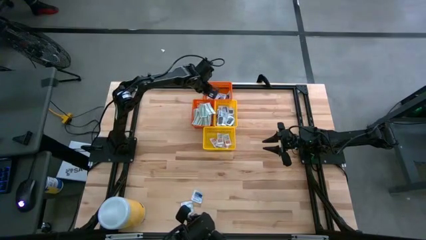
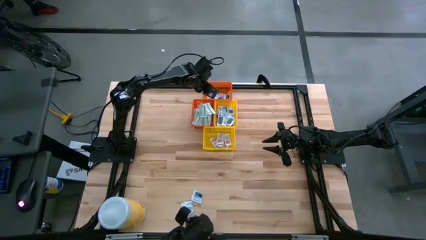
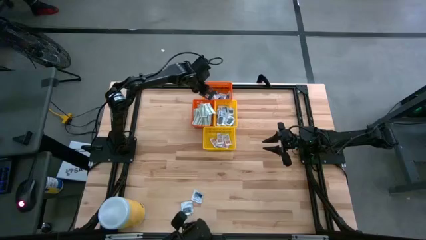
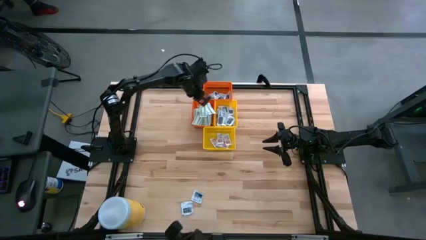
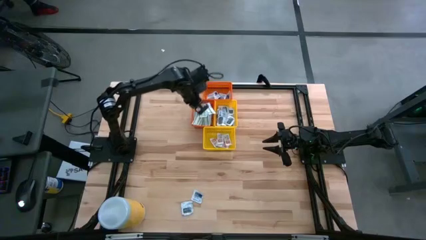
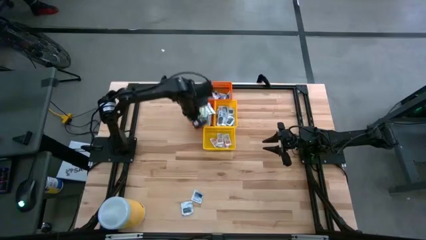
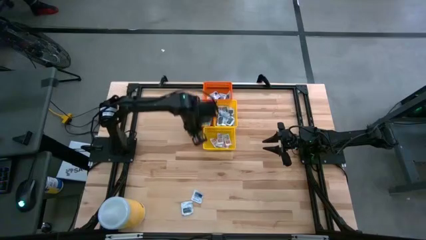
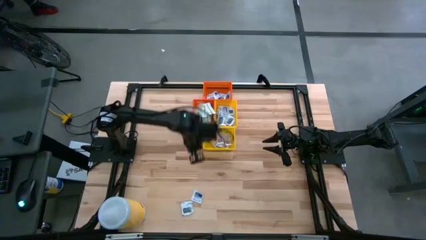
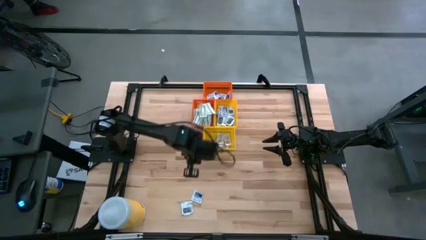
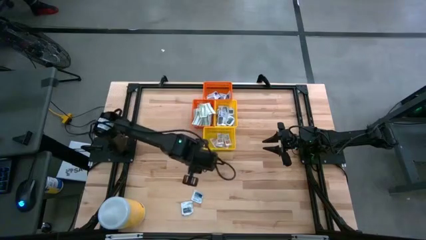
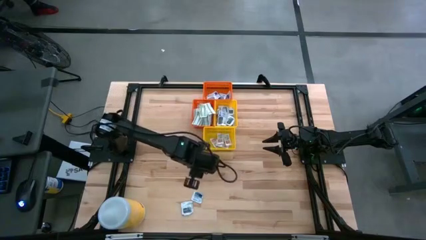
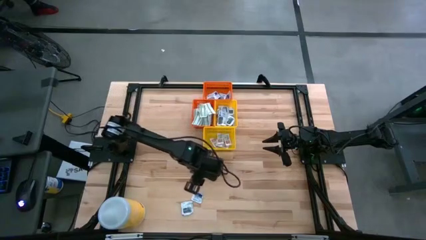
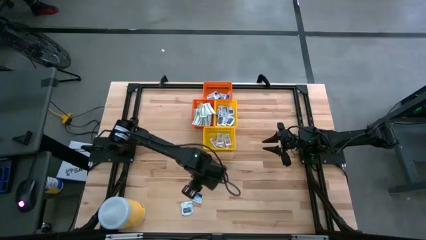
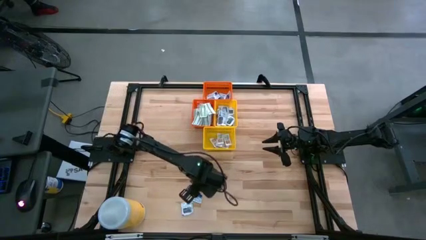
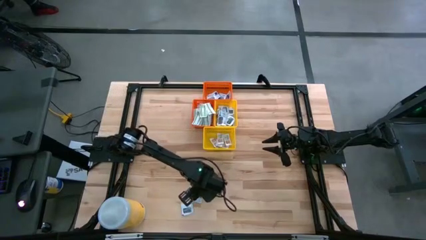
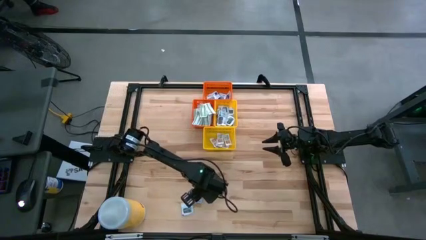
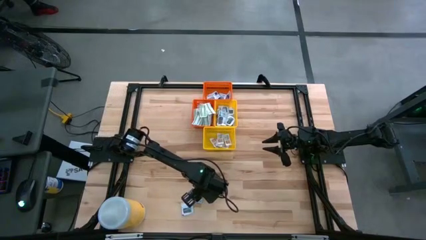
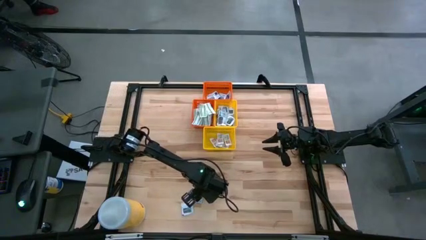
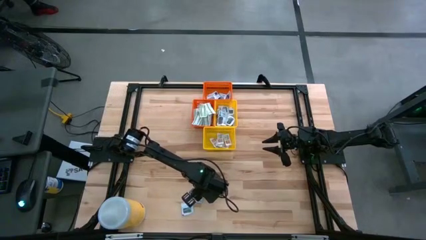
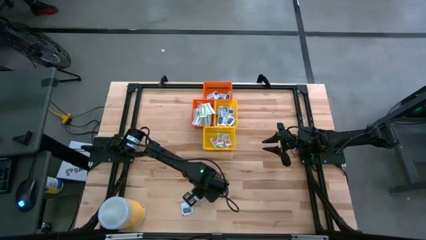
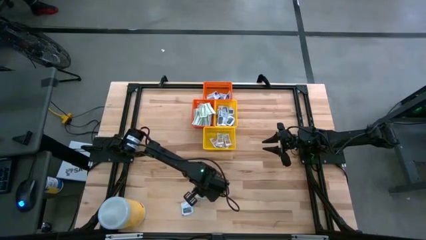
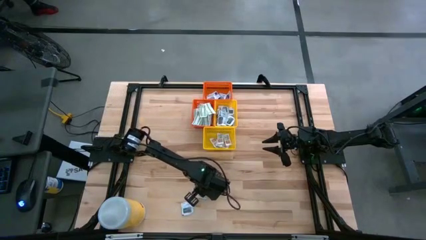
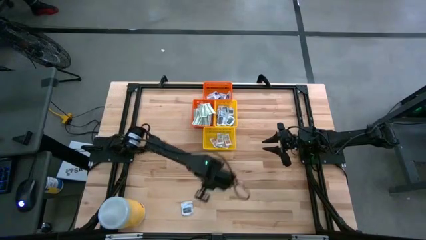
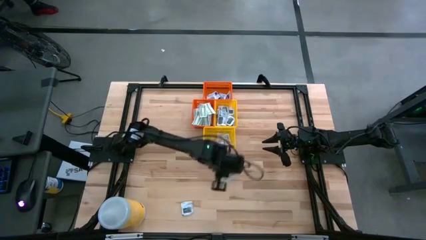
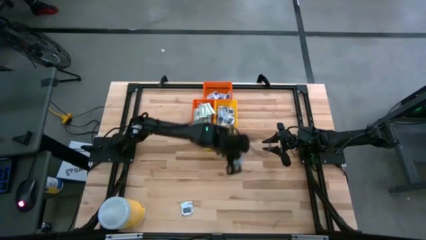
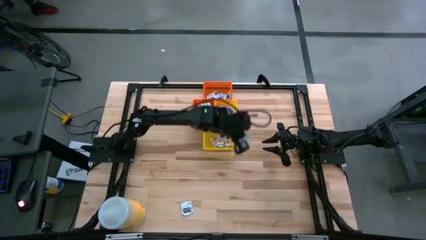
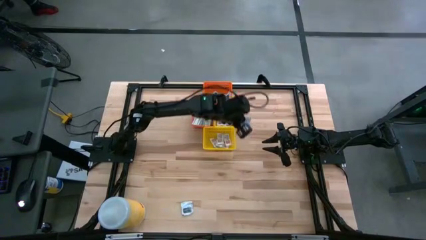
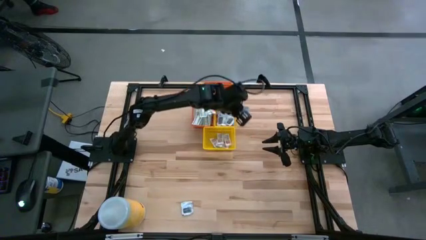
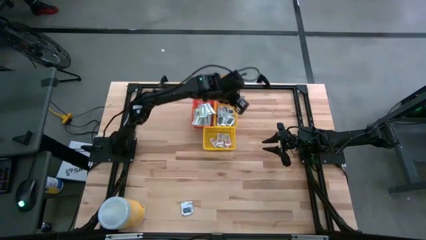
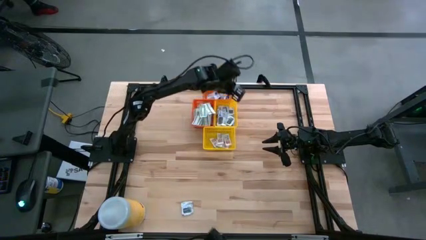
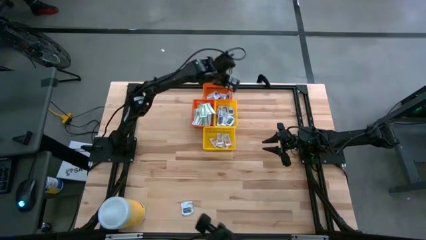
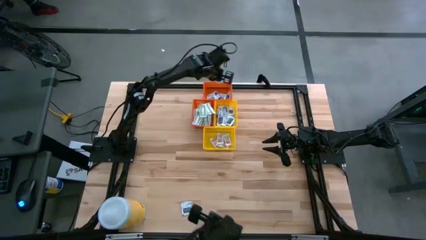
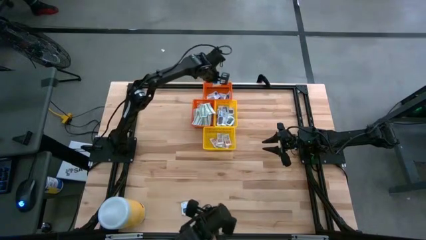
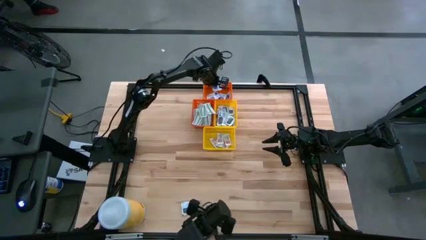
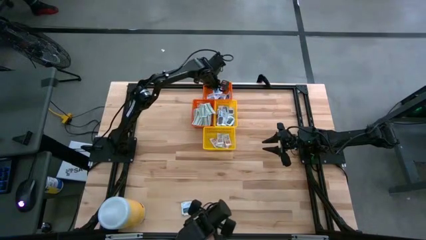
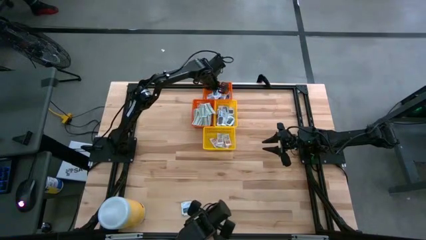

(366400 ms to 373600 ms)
Task: Pick & Place First Aid Supplies
Put the alcohol pad into the top orange bin

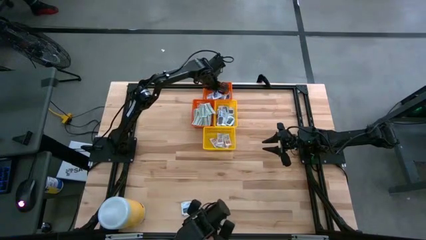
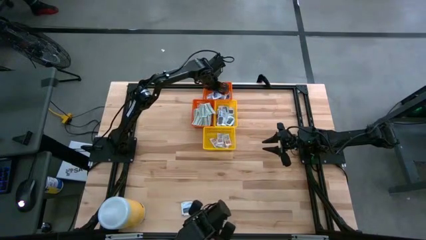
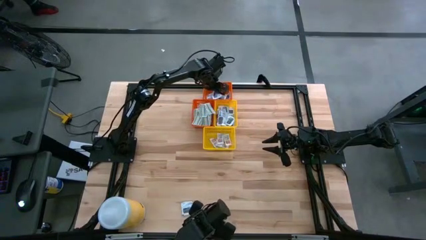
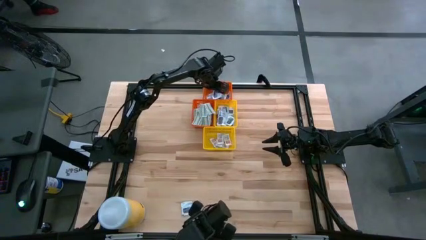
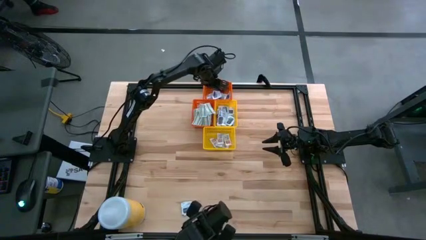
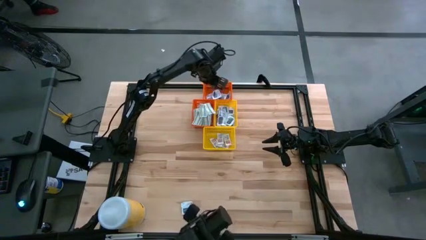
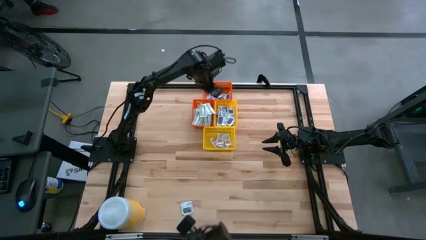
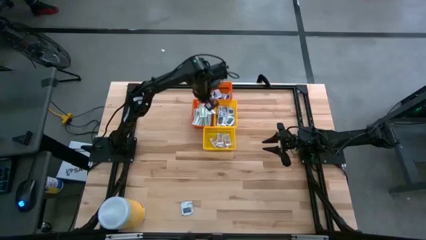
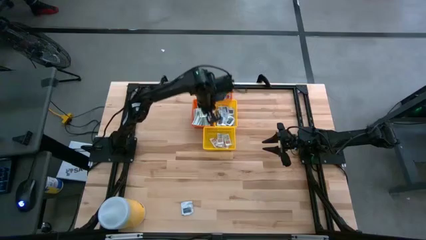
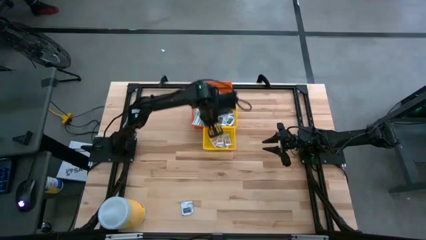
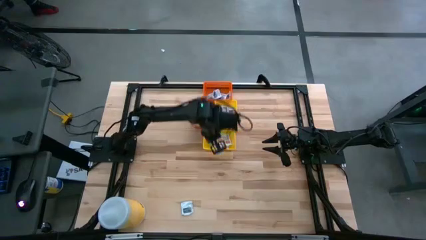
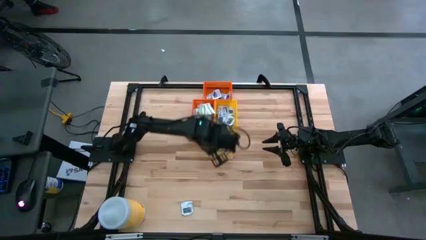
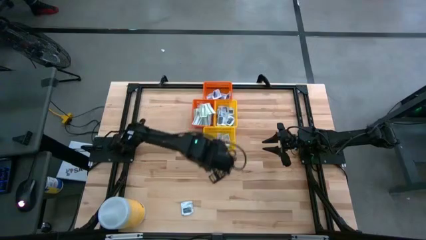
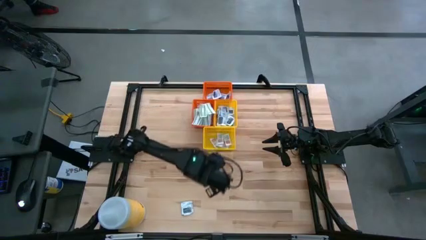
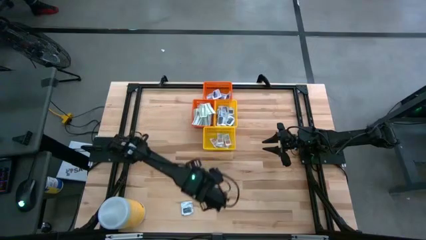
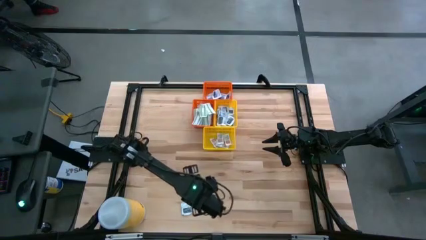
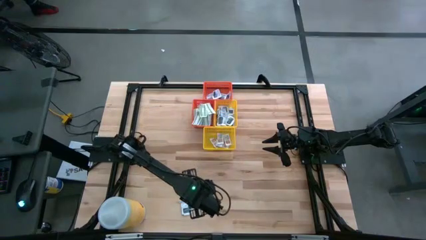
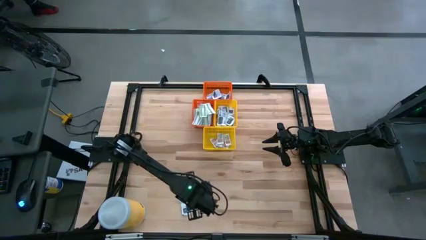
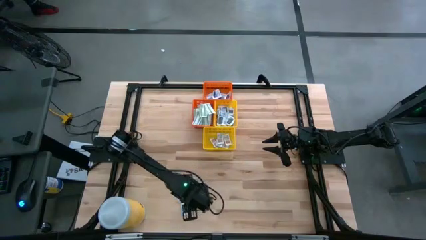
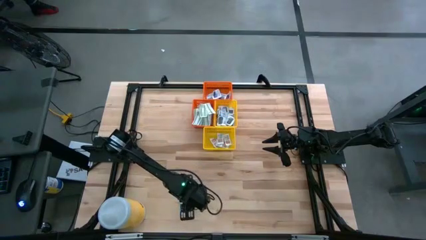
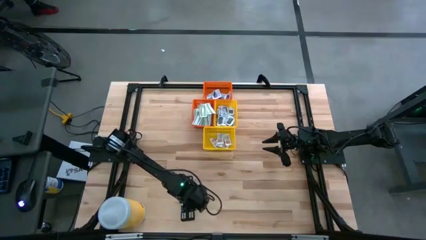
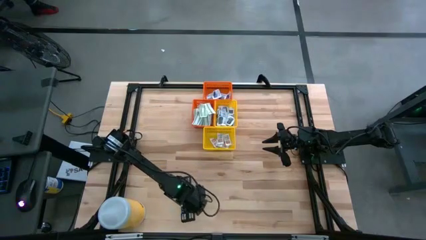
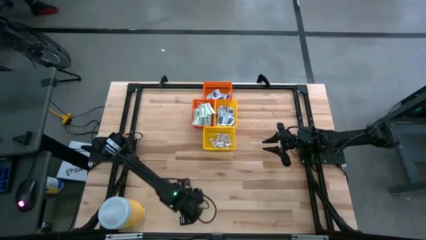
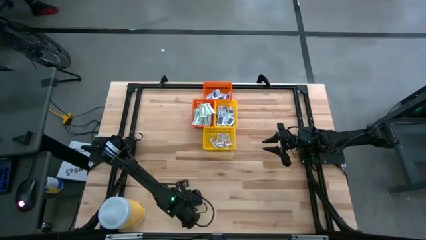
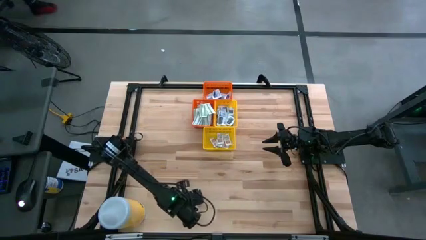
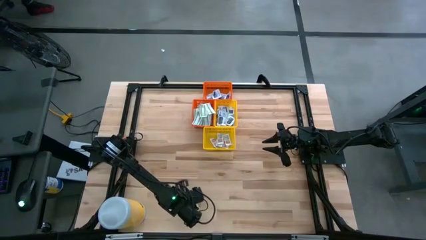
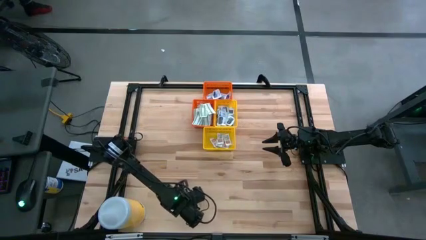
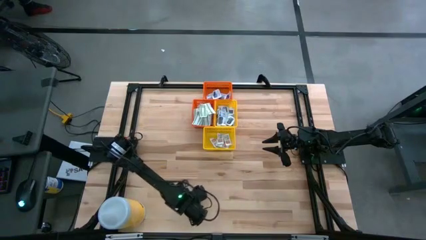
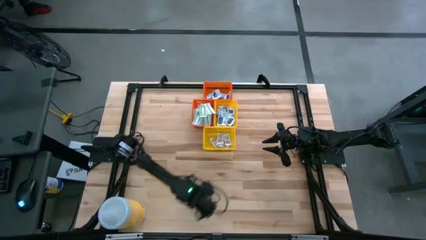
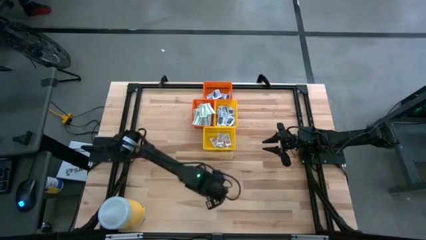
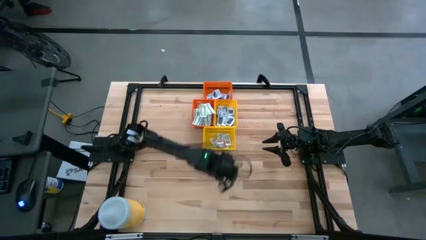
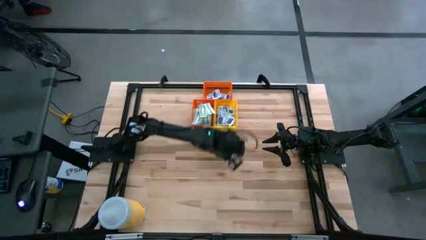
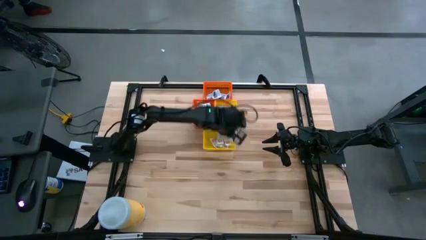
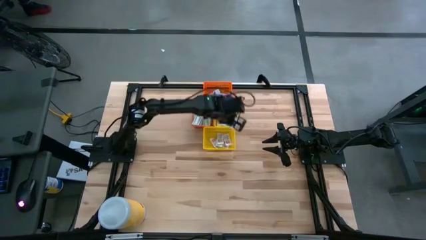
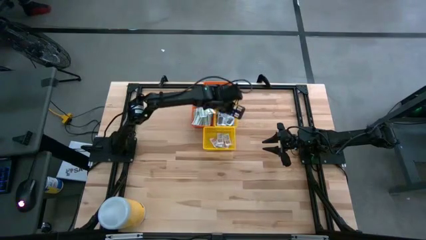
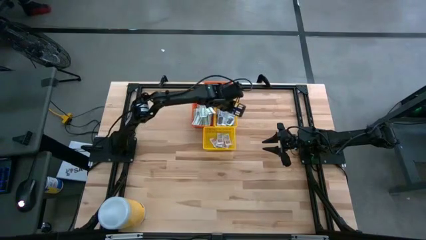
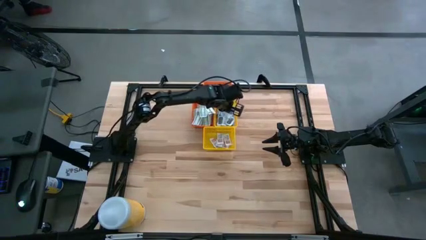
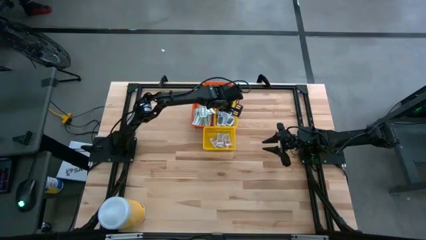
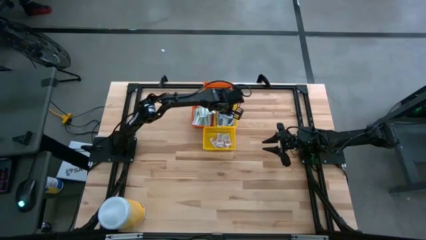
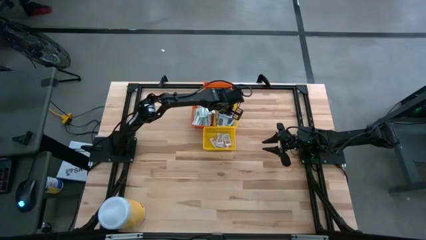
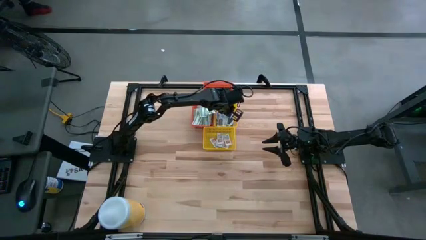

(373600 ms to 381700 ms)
Put the towelette pack into the top yellow bin
